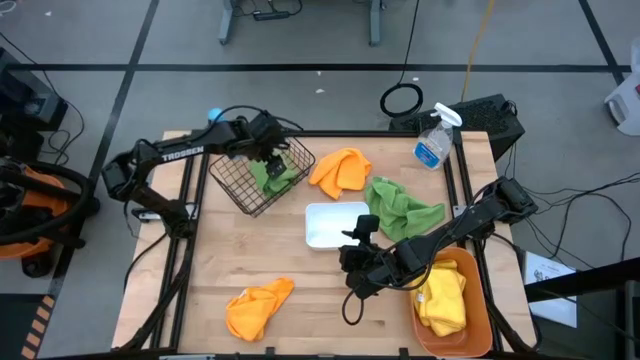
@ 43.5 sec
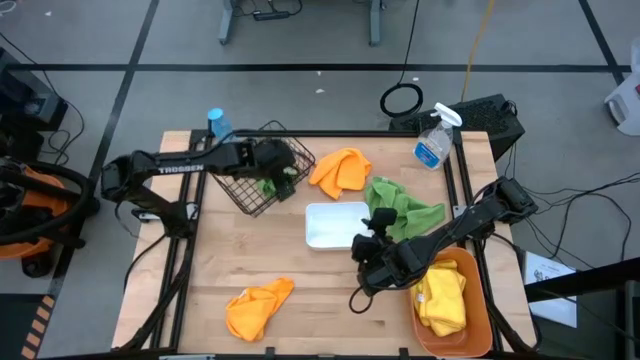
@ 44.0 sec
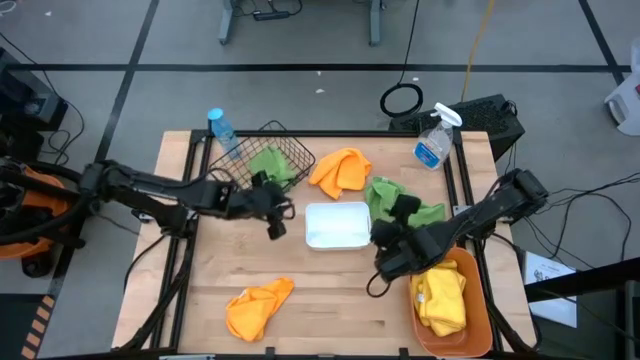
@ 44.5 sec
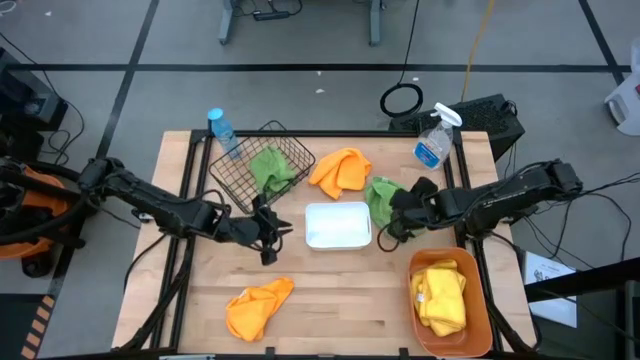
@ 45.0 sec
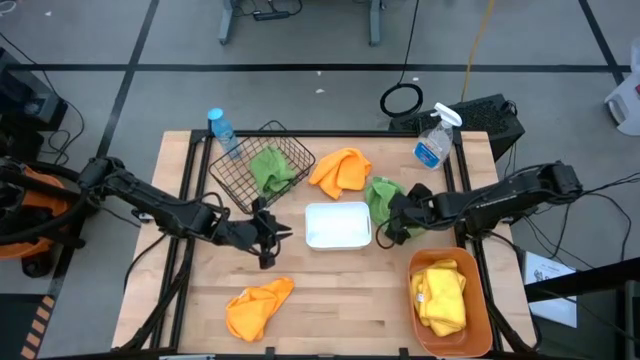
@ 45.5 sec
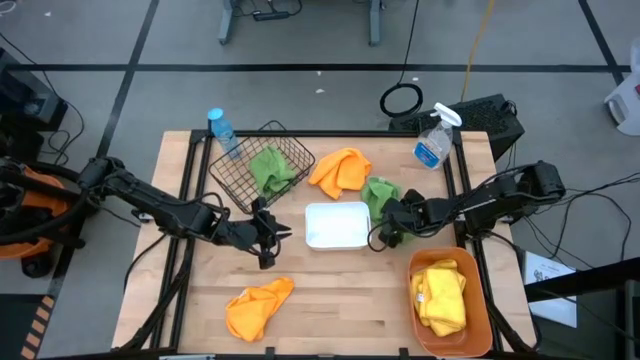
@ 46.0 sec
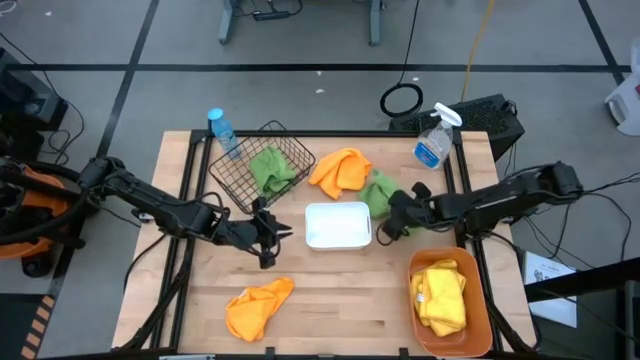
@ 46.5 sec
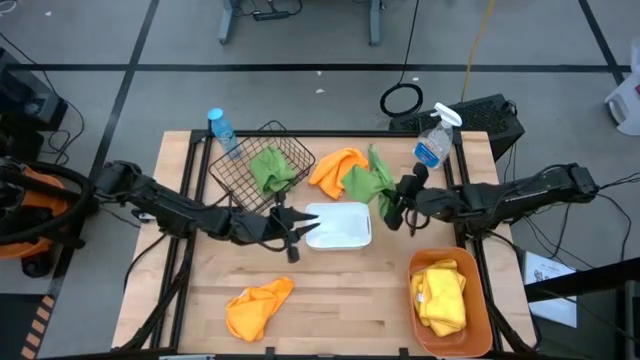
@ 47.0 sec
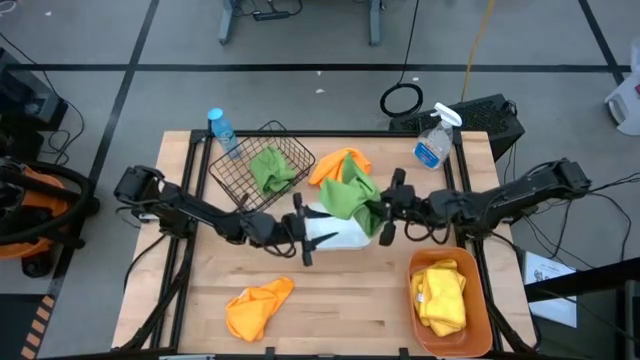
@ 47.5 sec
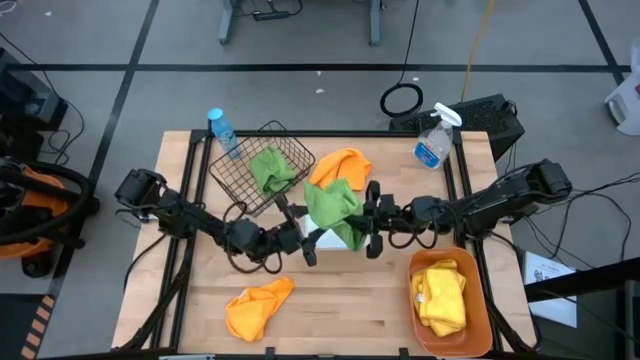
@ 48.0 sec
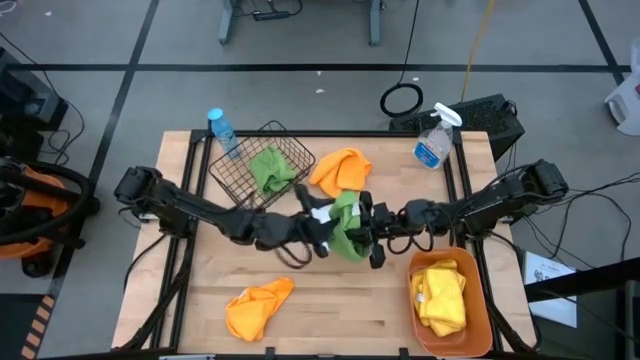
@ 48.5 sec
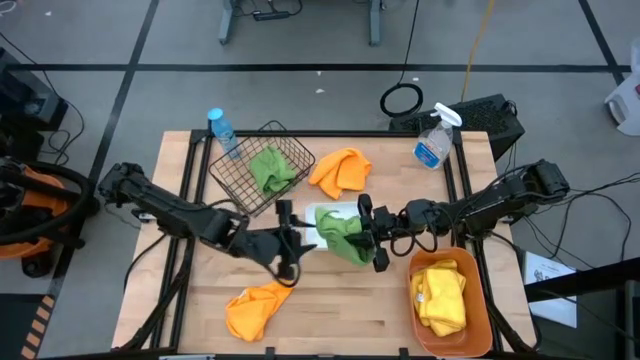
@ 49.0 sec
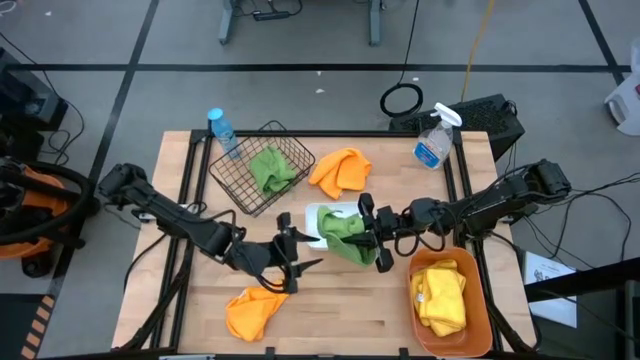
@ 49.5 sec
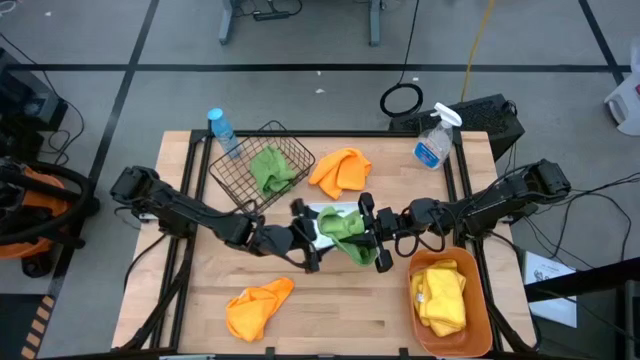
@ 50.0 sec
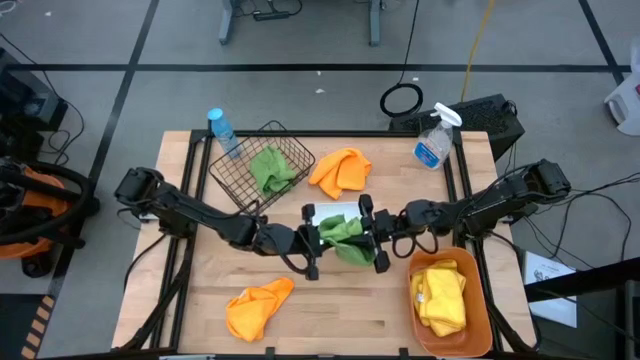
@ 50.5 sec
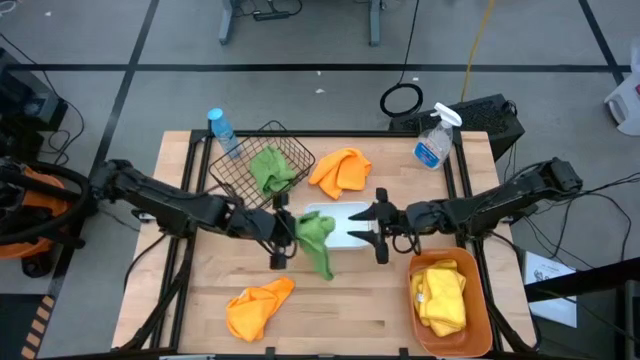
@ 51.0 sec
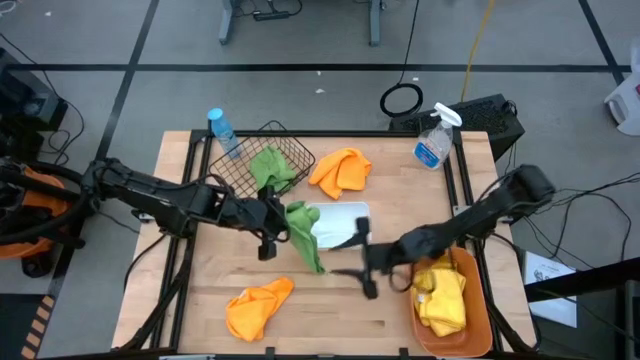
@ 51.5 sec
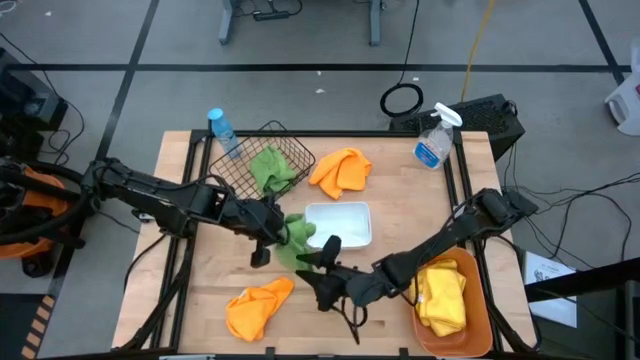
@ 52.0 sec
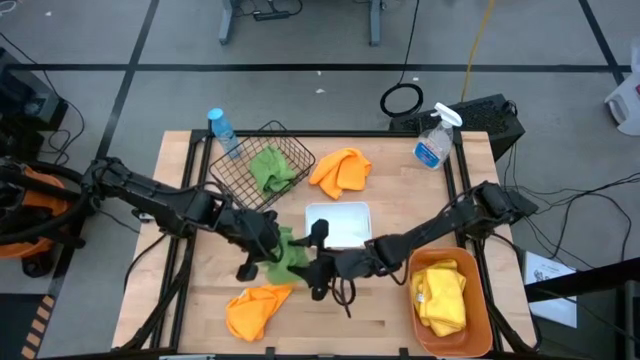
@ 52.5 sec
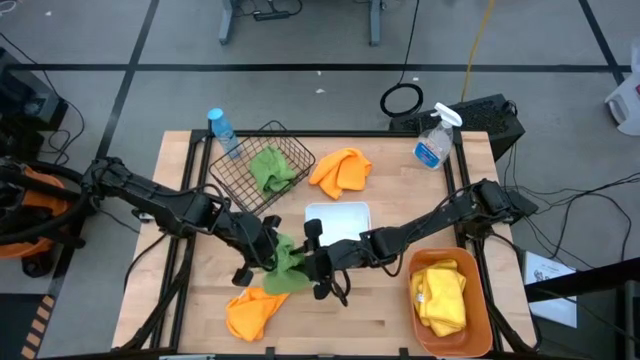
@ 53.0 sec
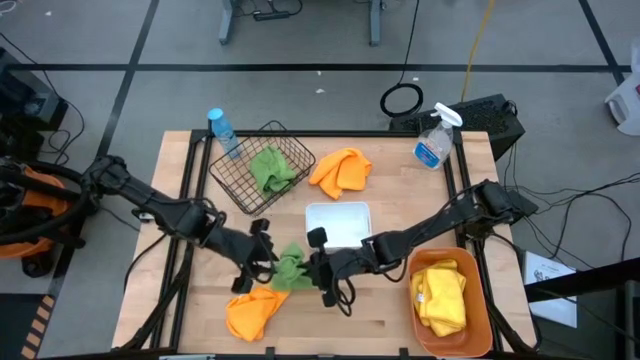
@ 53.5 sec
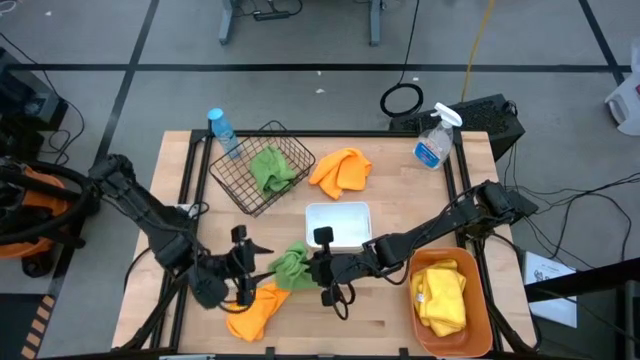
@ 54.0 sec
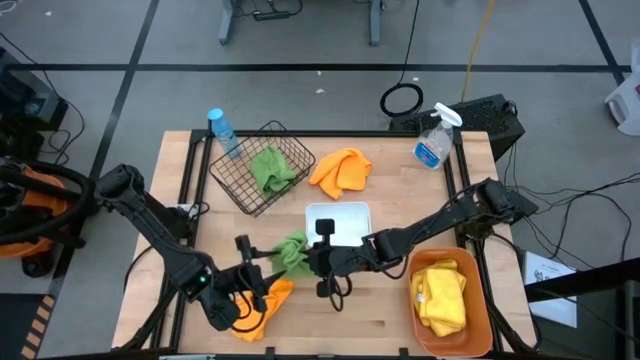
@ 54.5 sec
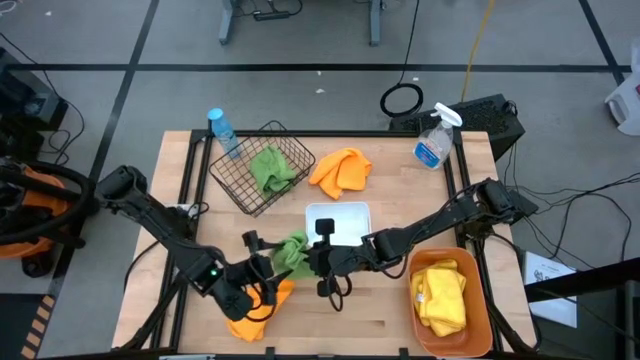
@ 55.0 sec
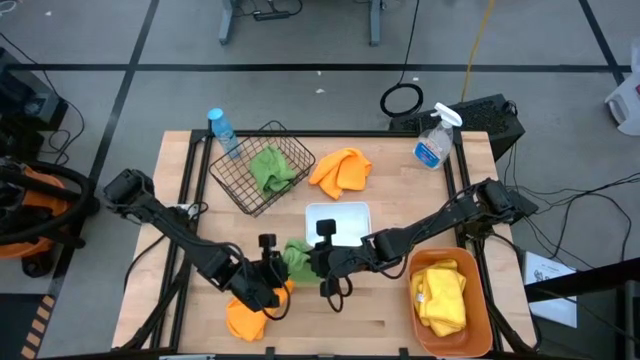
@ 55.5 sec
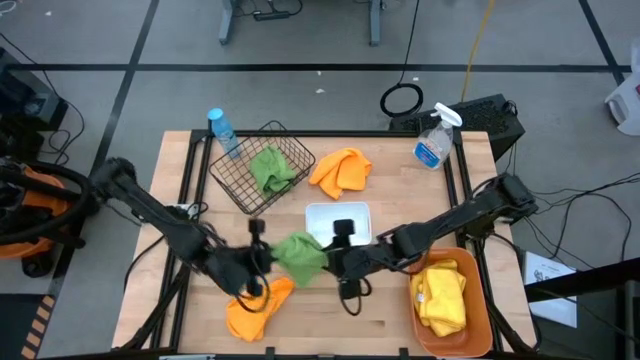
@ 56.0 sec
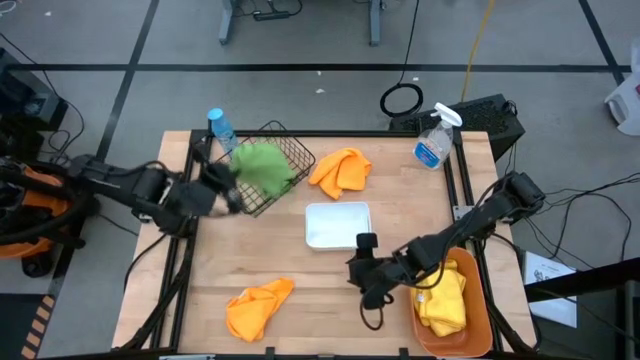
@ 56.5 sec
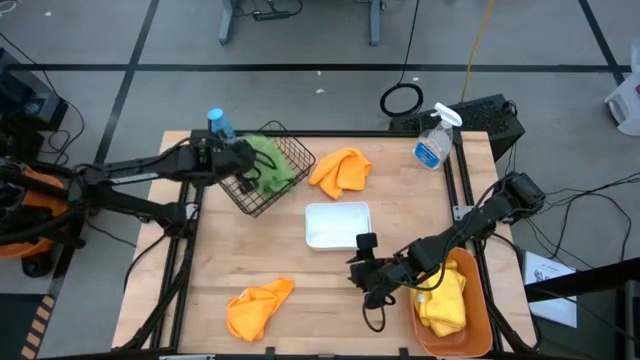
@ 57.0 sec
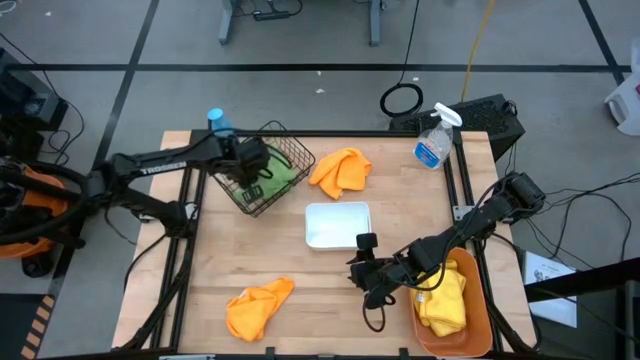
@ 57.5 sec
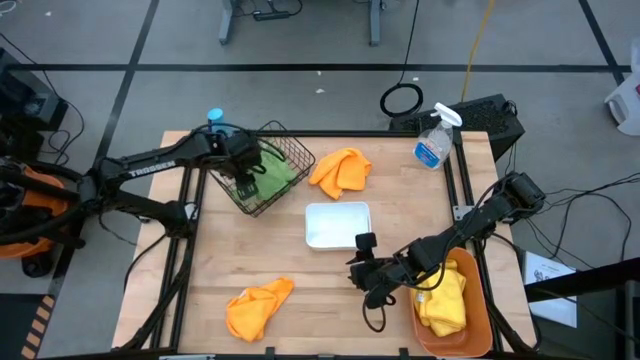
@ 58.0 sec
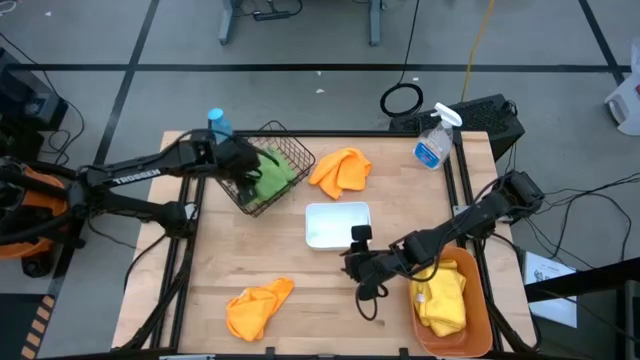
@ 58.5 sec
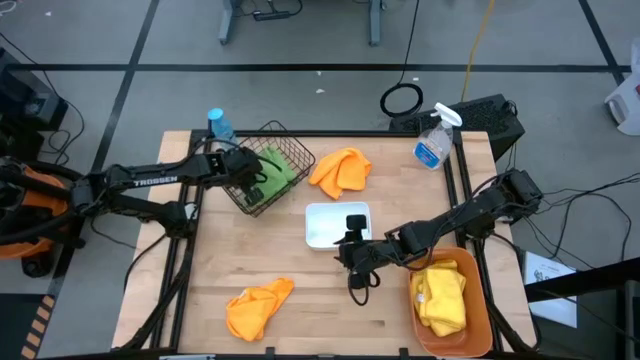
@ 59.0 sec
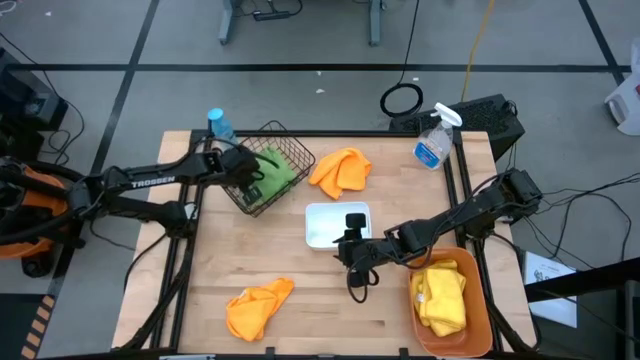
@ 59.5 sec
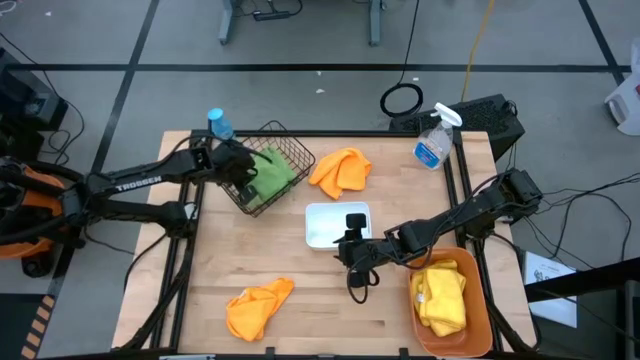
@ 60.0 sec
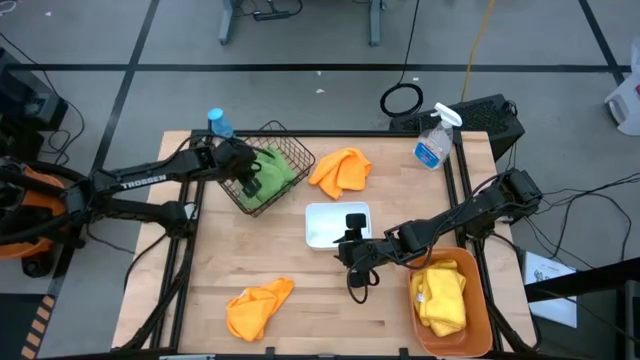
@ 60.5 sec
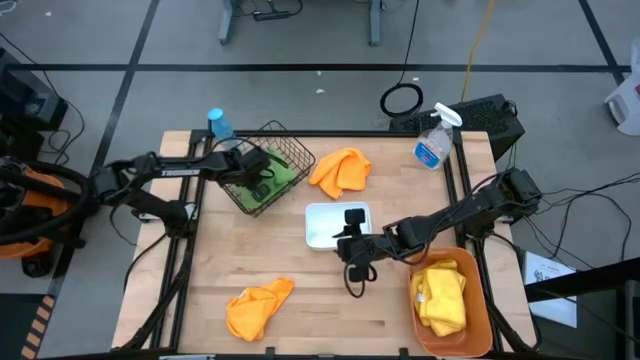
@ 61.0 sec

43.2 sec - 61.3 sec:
Task: Sort microfiber towel by color & place in baskets
Put the green microfiber towel into the black wire basket

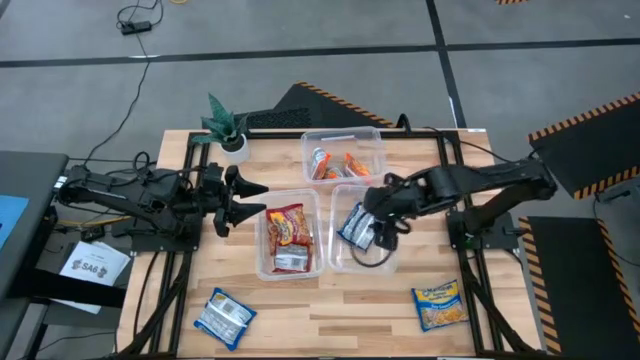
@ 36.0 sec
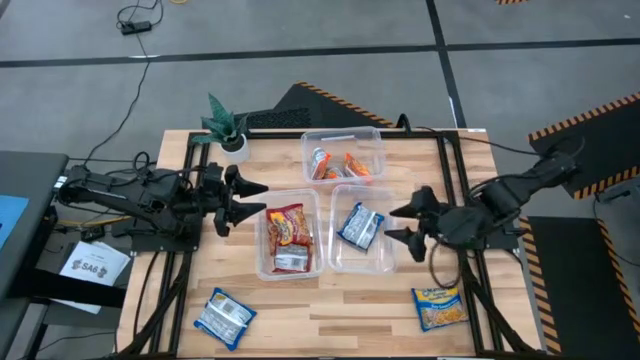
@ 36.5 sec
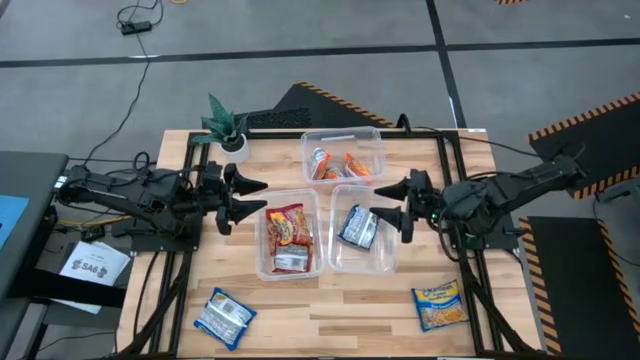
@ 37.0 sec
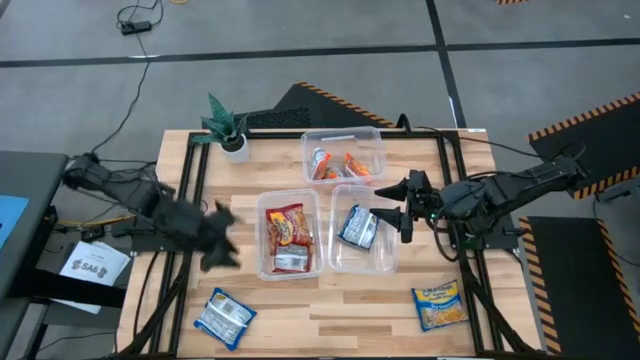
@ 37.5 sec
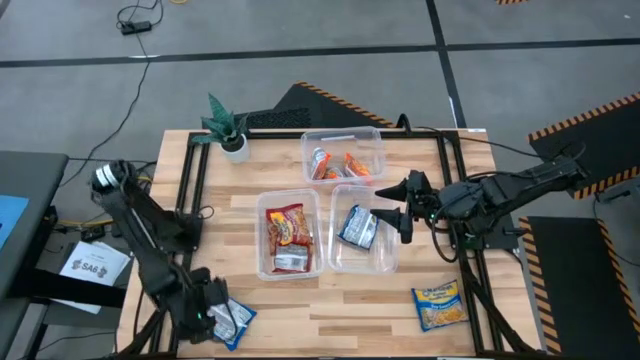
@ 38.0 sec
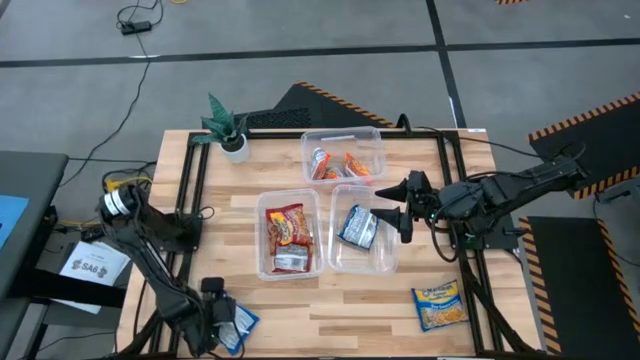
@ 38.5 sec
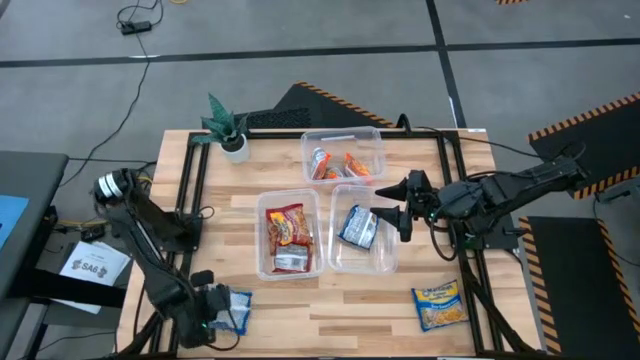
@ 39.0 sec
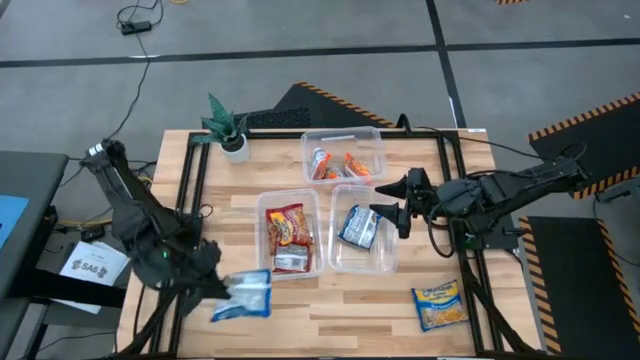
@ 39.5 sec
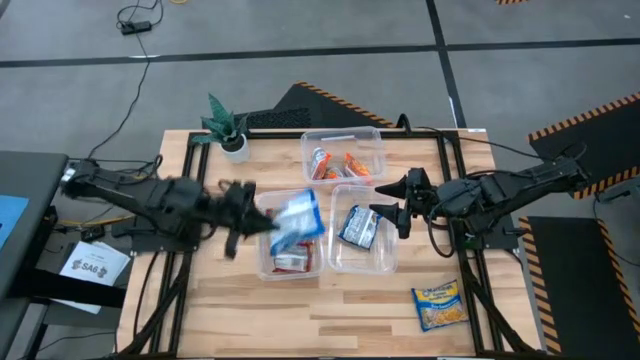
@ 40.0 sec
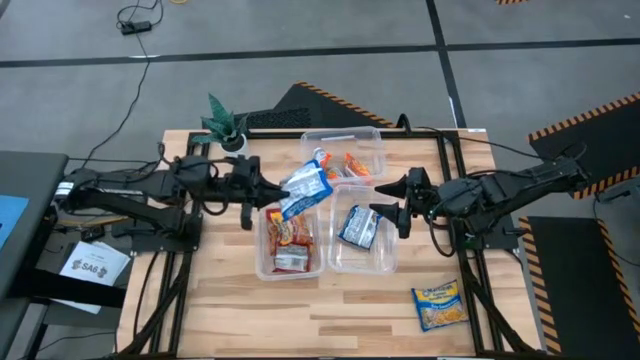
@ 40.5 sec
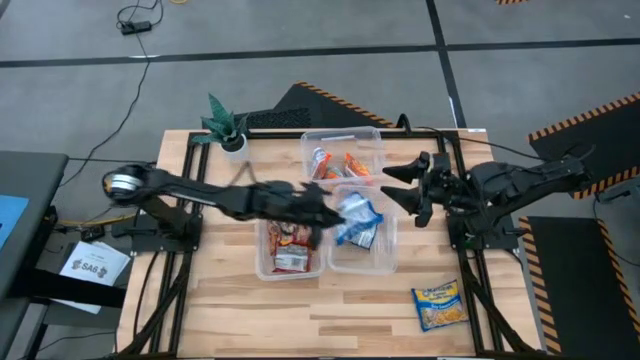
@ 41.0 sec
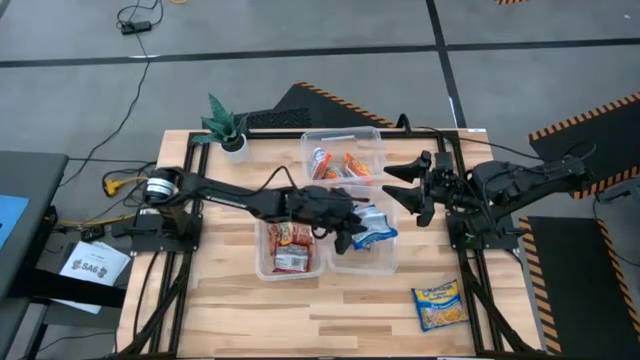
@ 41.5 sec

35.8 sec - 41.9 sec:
Task: Sort Maruchan noodles
Put the left blue noodle pack into the bottom right transparent bin
